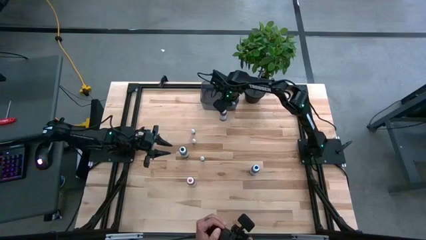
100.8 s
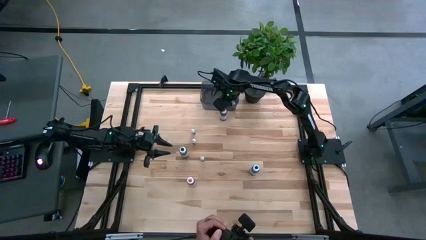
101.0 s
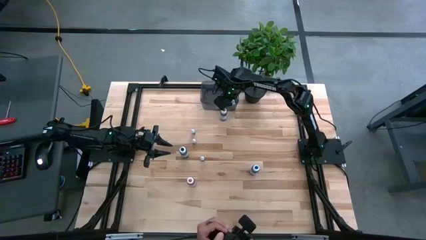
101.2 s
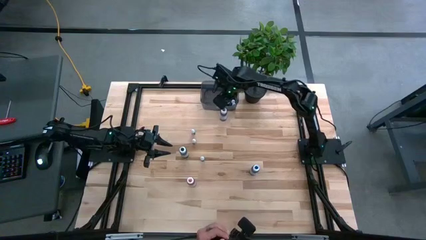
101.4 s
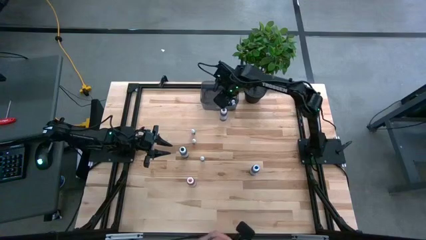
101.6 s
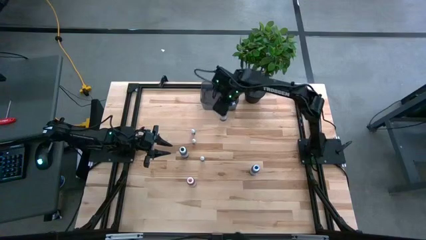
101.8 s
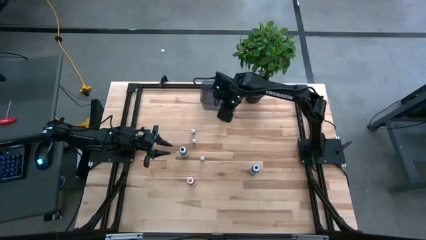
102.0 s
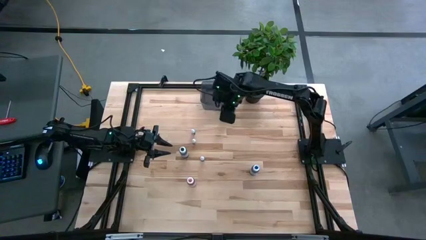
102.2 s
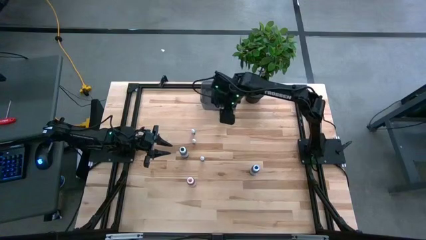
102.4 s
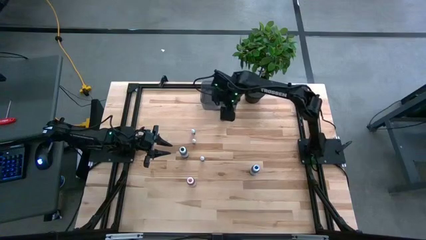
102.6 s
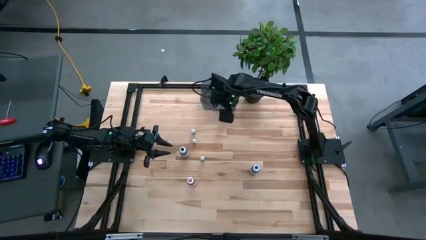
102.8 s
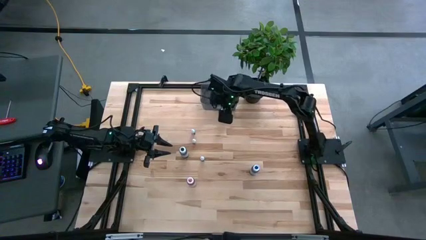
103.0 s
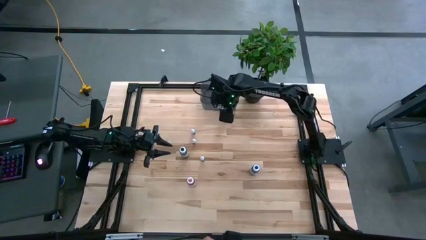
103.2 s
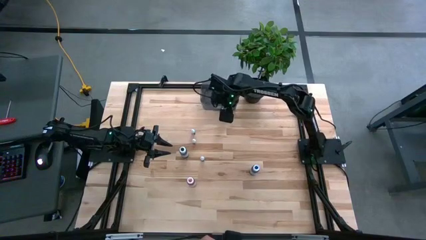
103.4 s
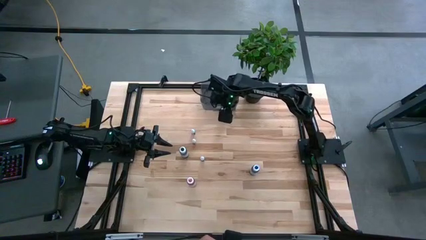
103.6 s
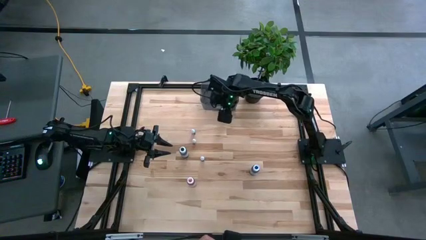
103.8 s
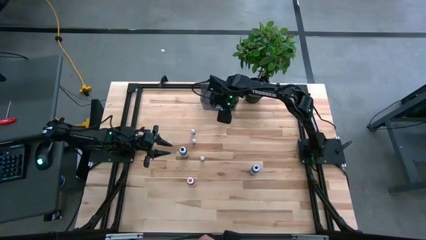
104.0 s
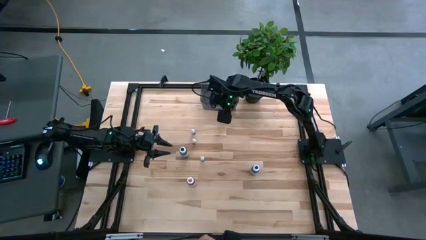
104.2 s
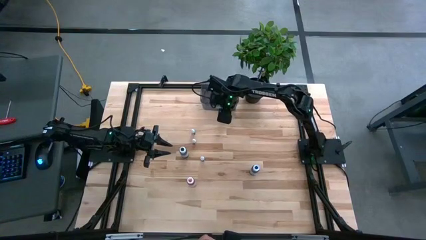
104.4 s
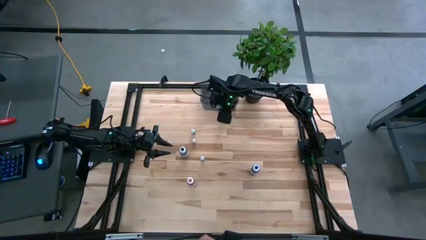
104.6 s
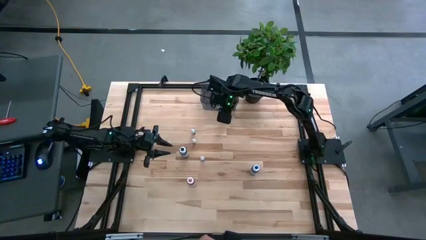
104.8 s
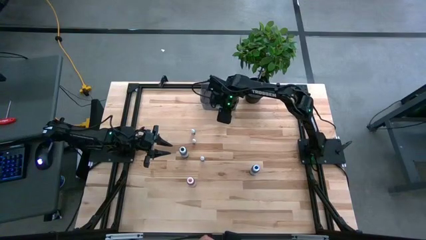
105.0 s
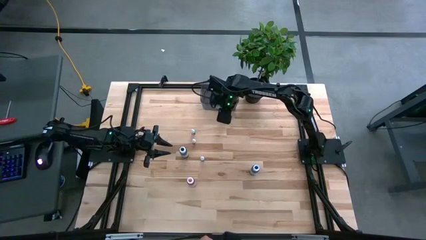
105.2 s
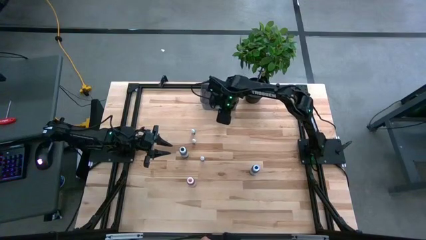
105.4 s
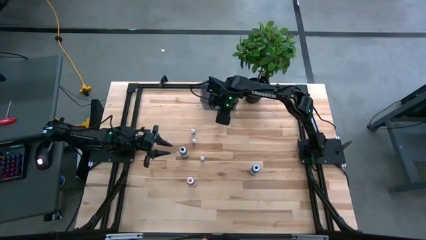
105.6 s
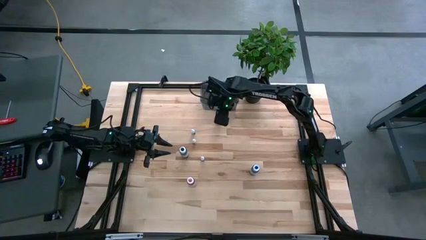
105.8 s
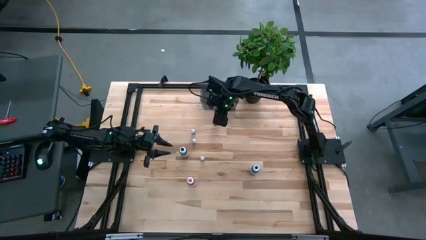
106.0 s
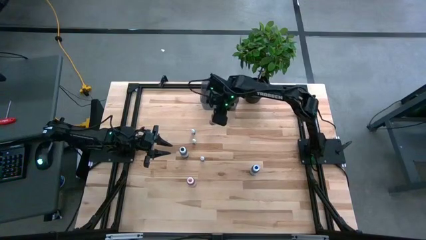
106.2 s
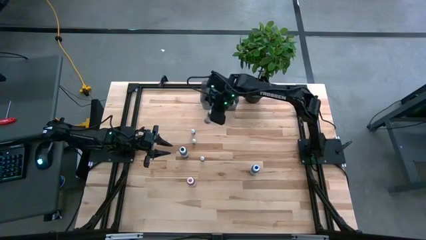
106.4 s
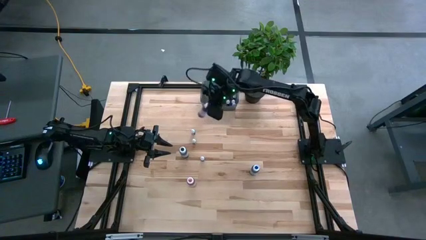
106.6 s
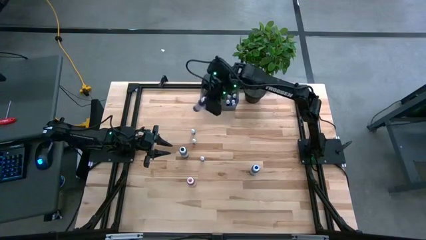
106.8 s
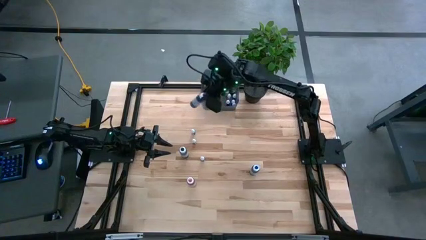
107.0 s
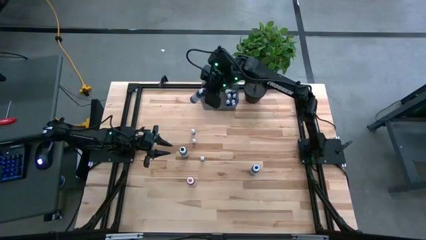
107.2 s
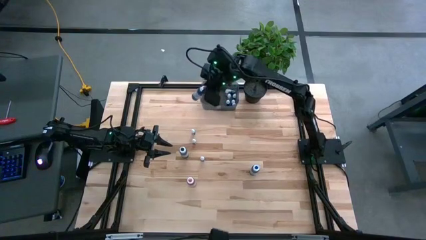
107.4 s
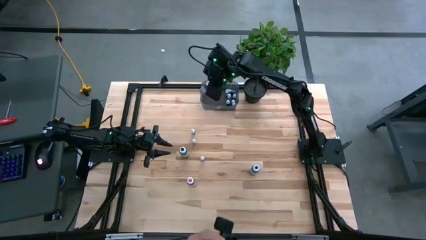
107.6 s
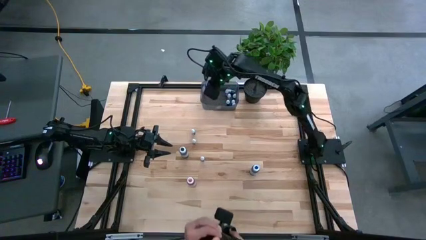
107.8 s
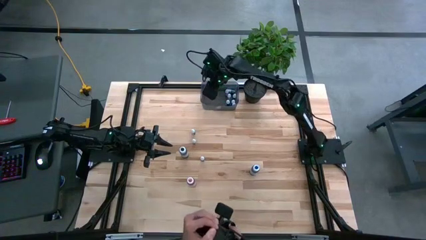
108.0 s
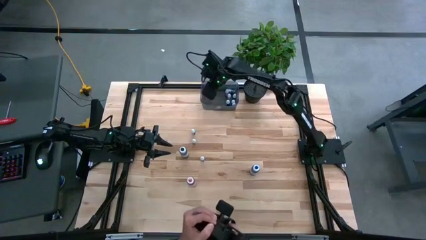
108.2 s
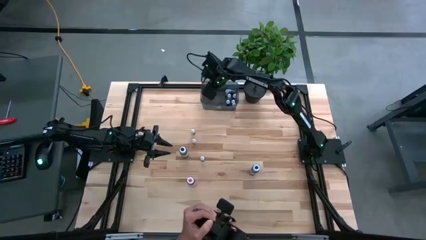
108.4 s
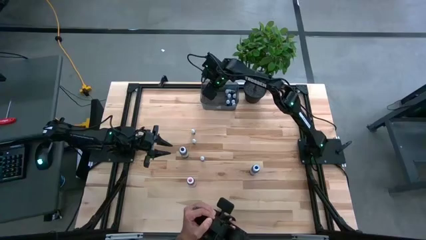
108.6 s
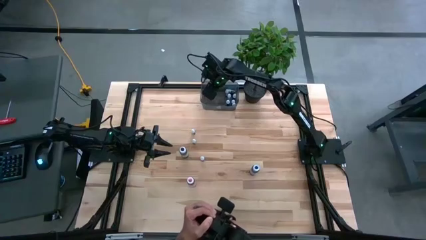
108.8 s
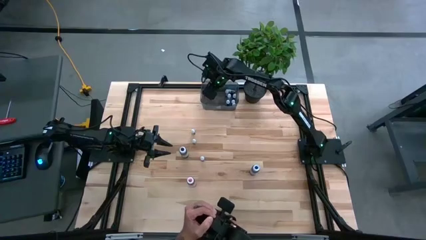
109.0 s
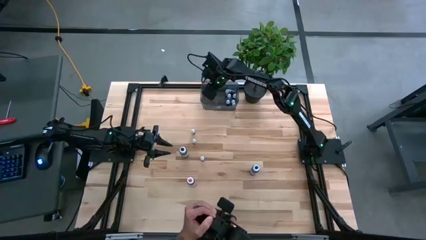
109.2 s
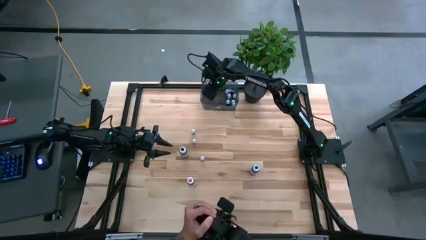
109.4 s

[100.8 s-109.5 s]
Task: Pick & Place food coloring
Put the large violet food into the black bin

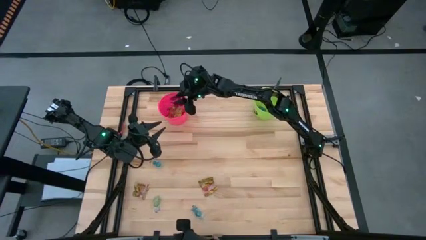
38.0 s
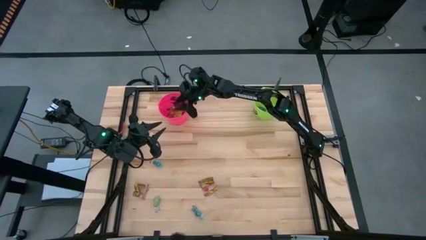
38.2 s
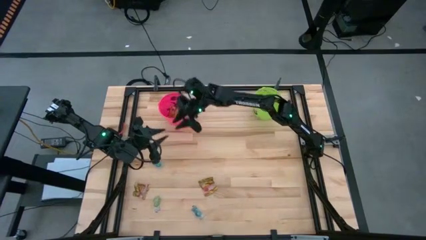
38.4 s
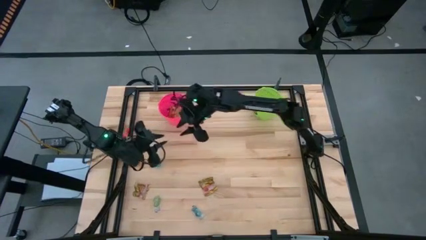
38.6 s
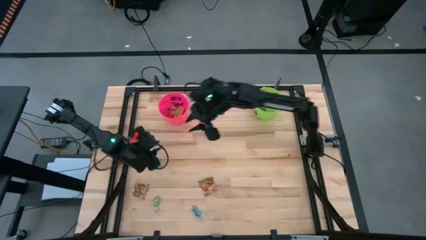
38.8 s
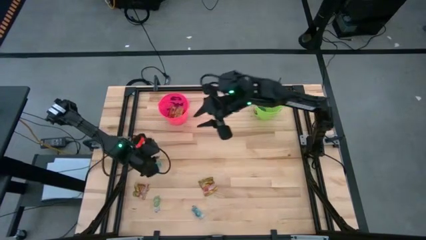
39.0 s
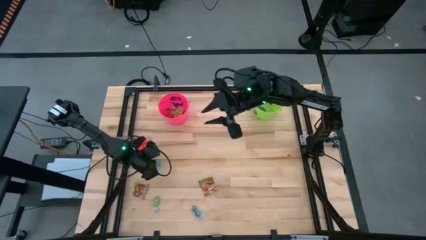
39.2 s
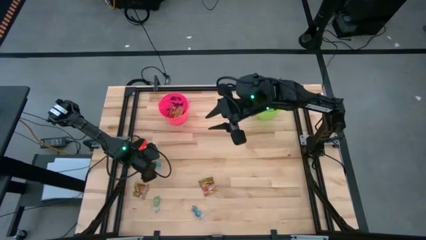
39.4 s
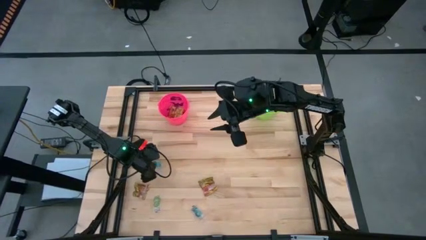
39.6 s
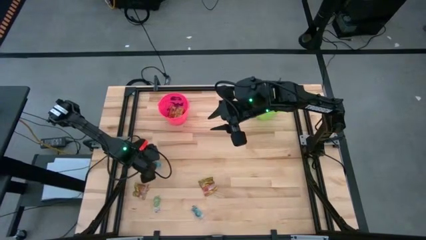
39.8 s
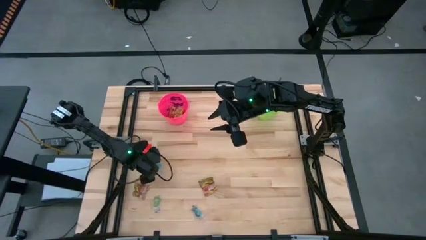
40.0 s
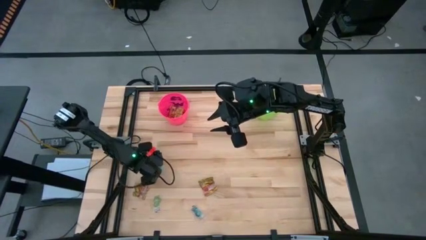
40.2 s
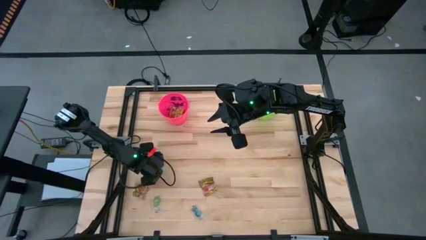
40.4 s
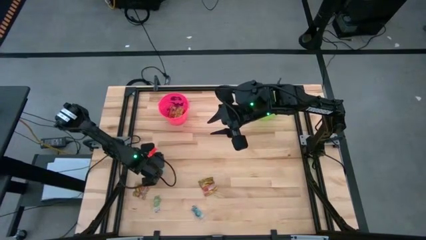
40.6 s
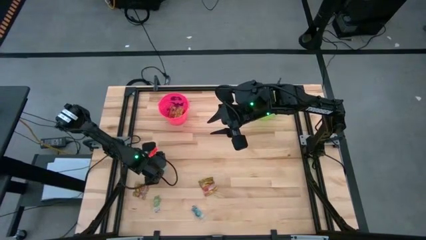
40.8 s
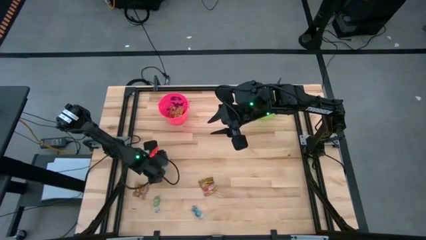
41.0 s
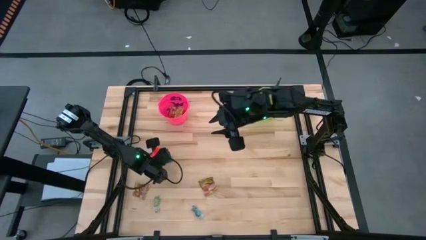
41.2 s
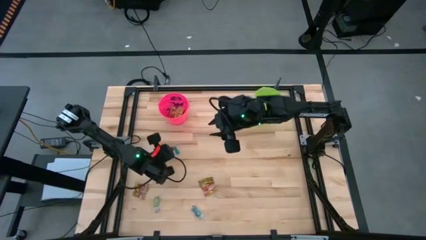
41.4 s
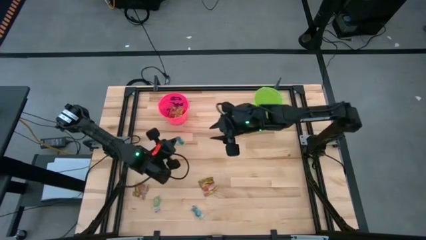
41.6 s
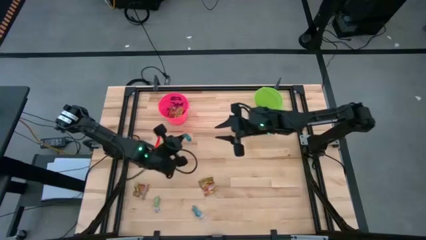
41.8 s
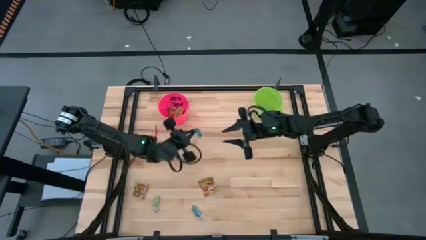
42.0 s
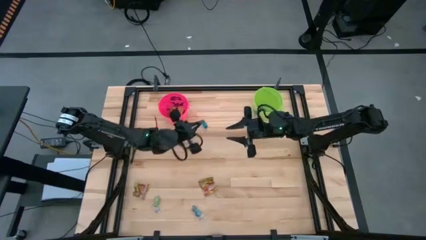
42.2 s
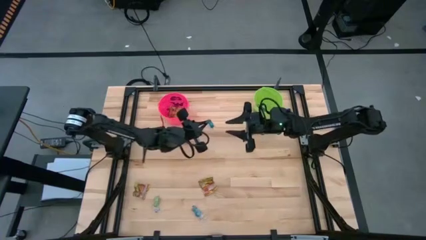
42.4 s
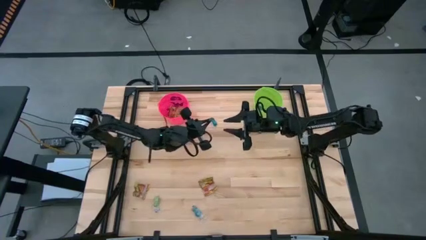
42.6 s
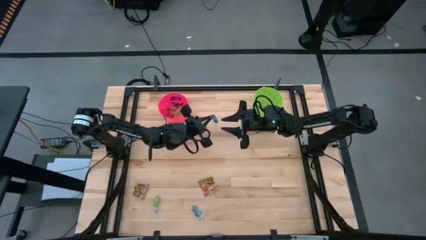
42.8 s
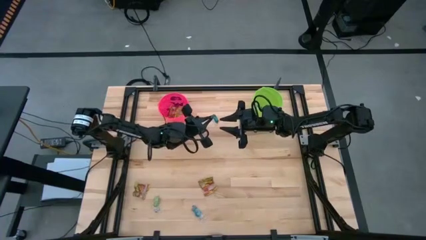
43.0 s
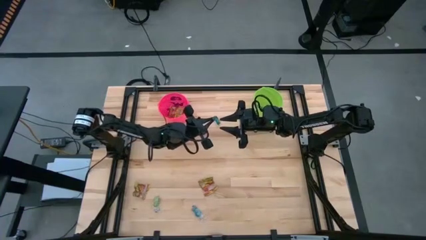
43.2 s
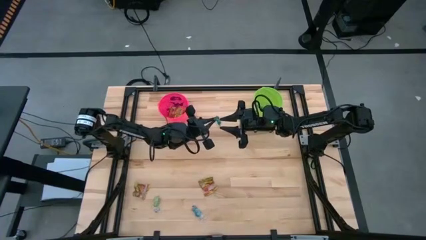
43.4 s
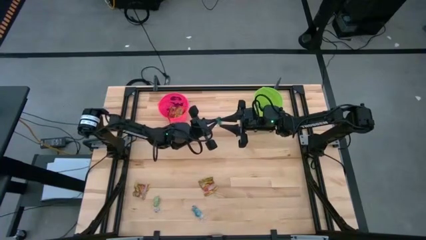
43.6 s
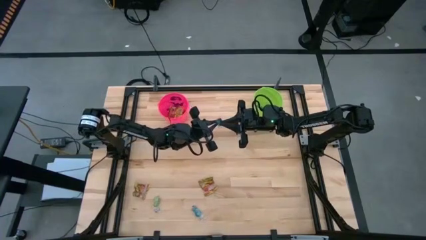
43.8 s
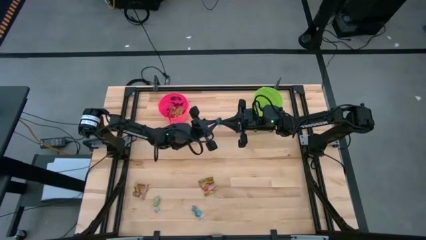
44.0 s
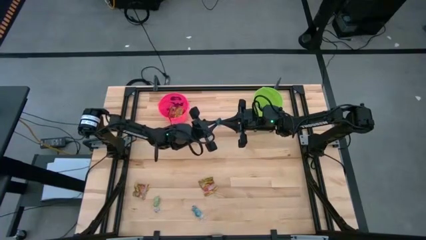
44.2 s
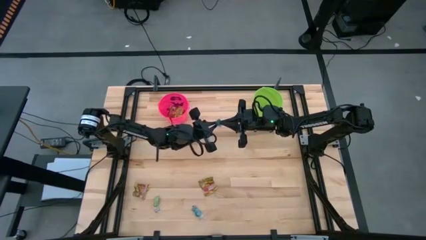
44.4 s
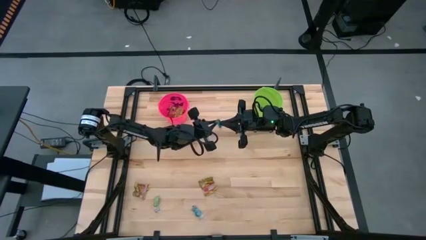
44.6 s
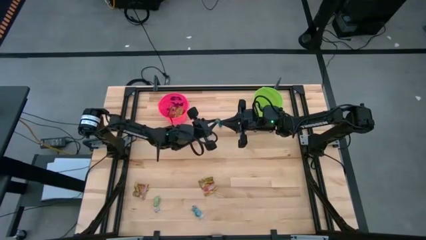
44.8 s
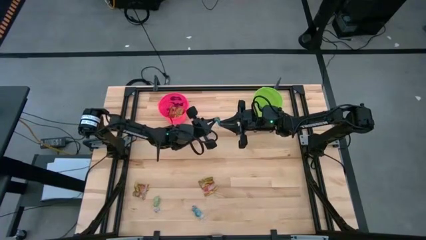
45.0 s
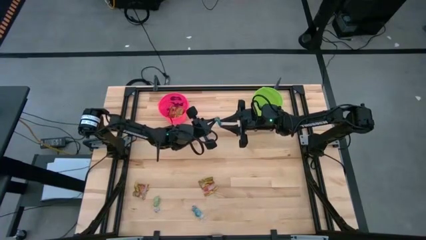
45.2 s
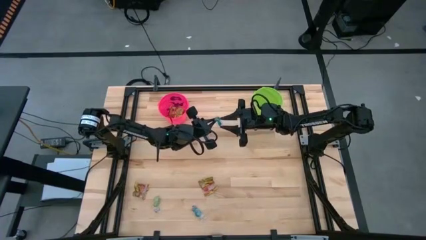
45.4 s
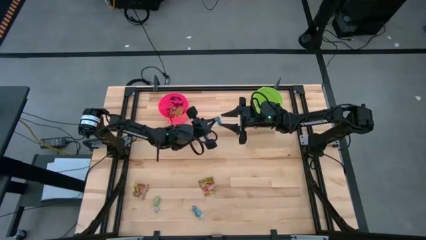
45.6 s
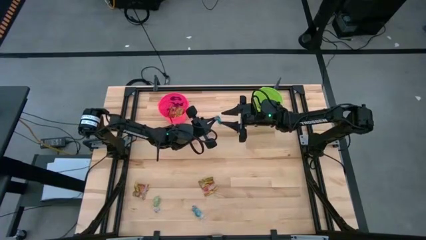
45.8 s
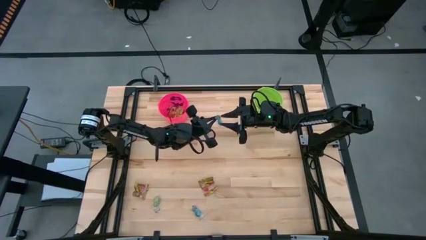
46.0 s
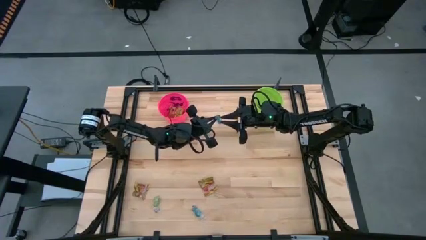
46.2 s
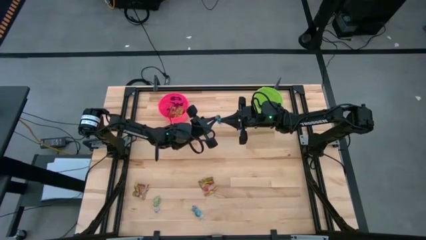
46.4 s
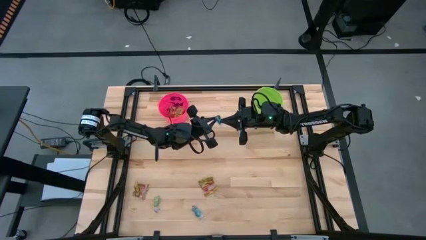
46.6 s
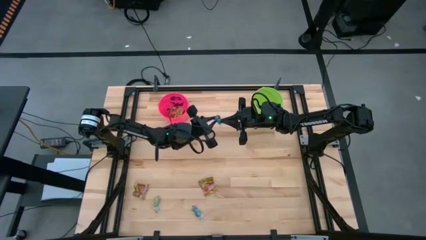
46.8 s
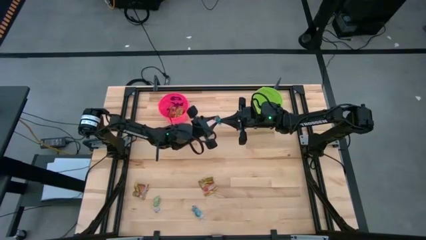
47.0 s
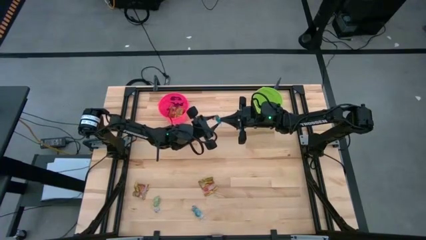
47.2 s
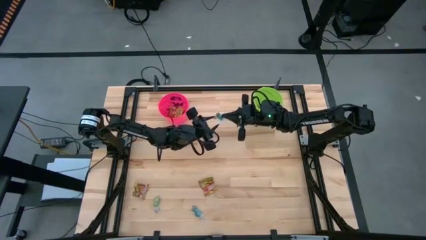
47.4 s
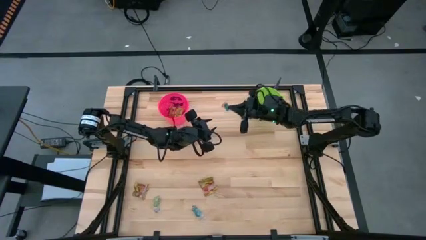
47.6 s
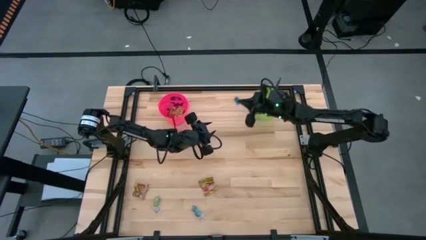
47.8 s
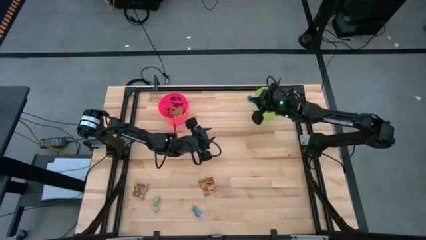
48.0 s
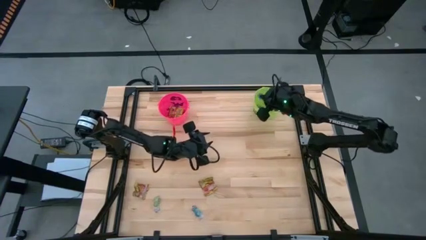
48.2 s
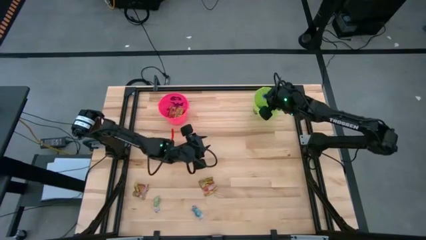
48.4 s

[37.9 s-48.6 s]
Task: Sort candy by brand, put in halloween buckets
Put the blue candy into the green bucket
